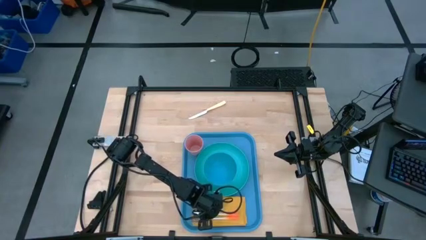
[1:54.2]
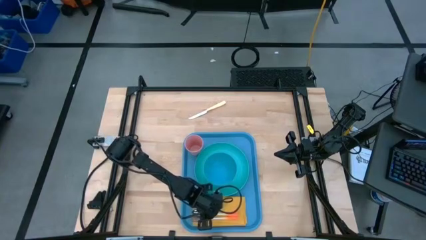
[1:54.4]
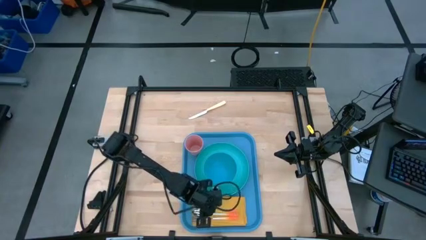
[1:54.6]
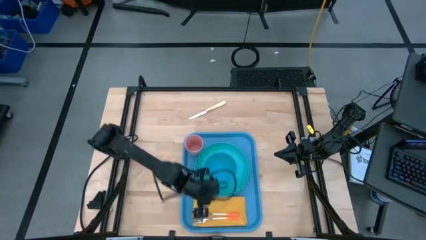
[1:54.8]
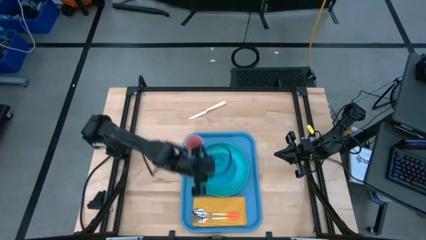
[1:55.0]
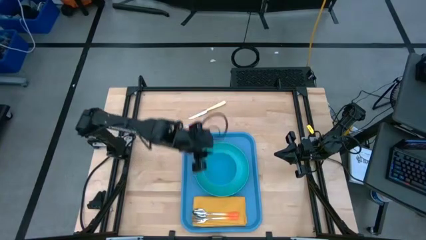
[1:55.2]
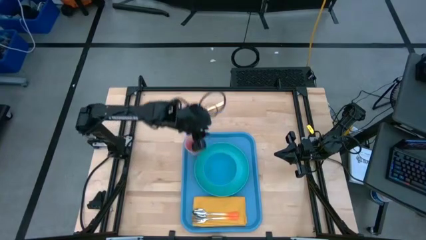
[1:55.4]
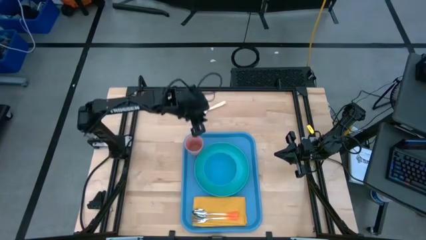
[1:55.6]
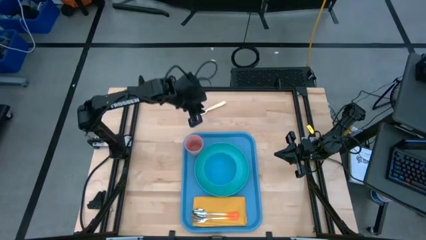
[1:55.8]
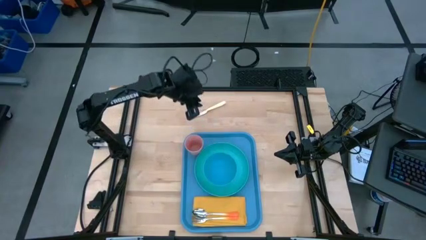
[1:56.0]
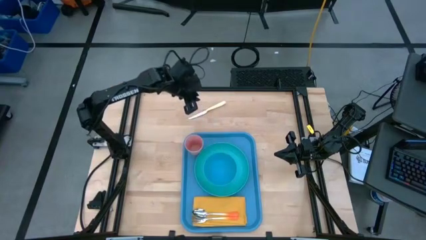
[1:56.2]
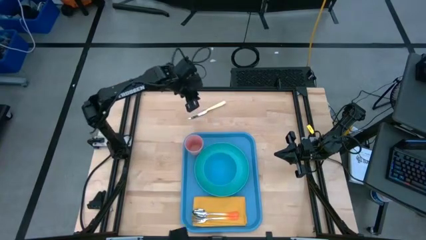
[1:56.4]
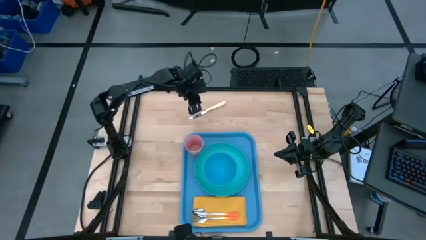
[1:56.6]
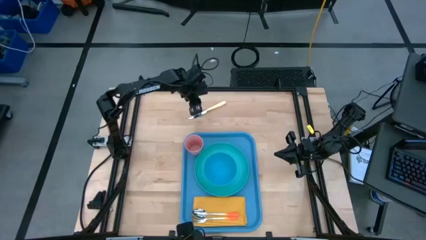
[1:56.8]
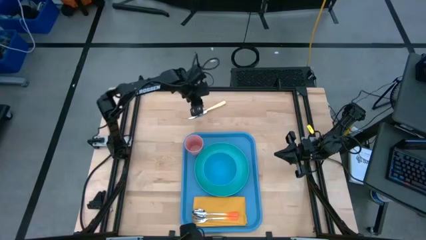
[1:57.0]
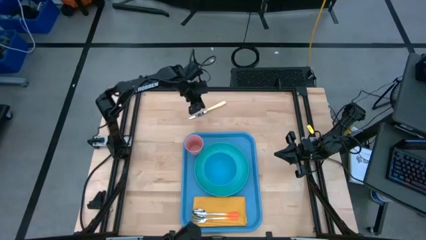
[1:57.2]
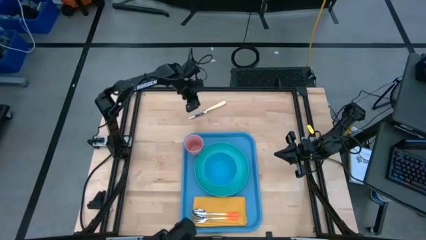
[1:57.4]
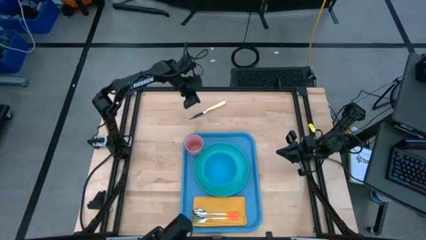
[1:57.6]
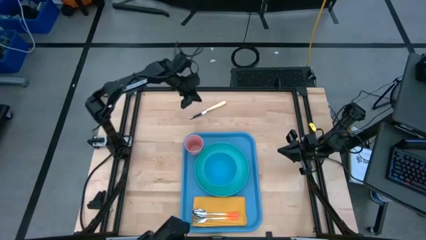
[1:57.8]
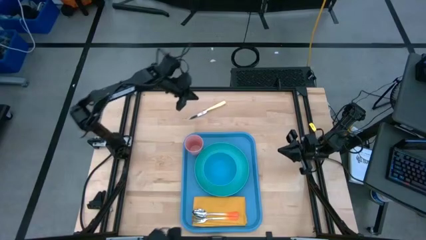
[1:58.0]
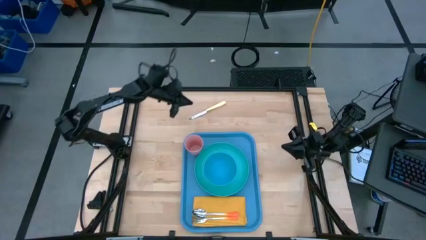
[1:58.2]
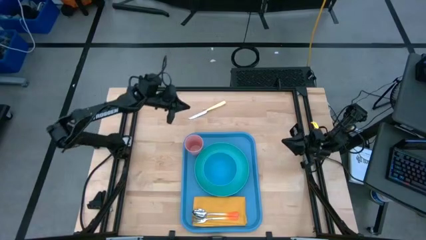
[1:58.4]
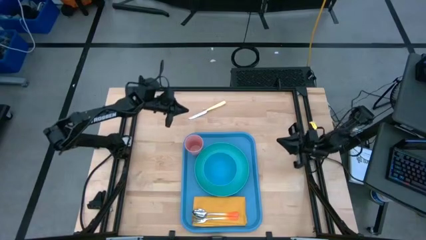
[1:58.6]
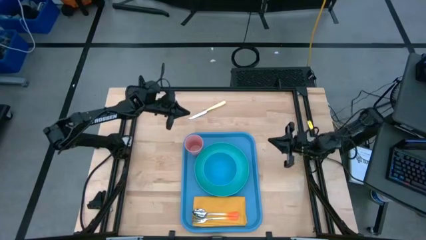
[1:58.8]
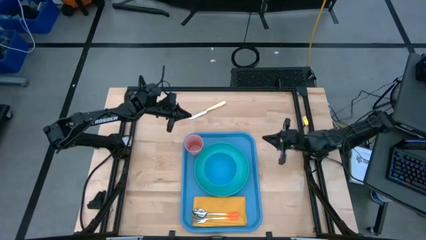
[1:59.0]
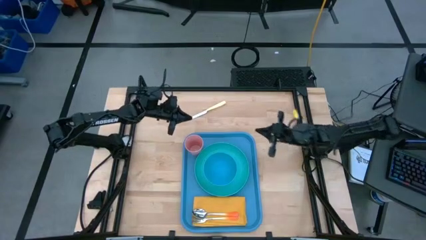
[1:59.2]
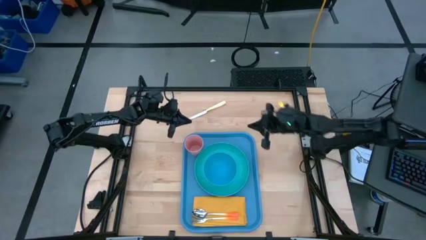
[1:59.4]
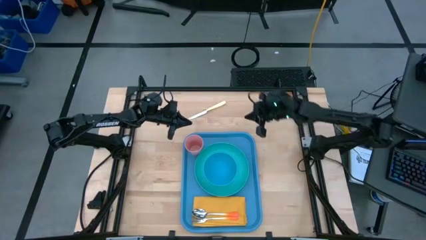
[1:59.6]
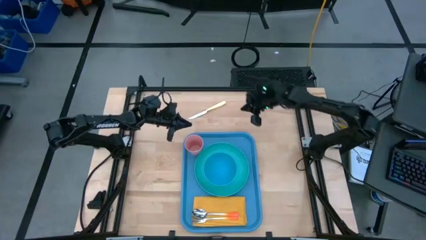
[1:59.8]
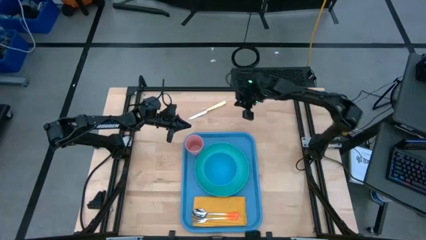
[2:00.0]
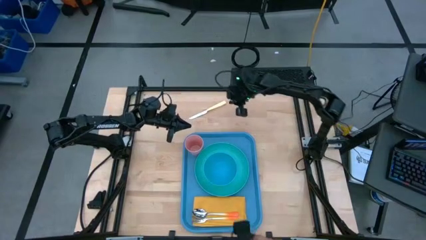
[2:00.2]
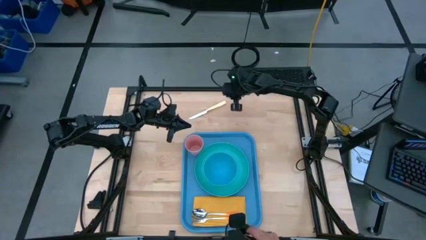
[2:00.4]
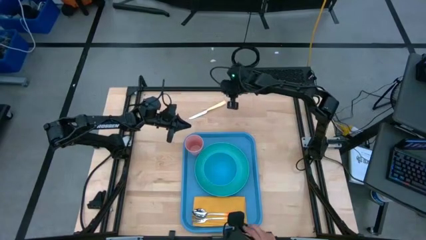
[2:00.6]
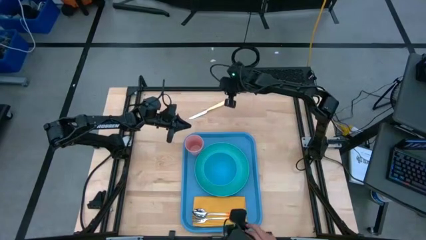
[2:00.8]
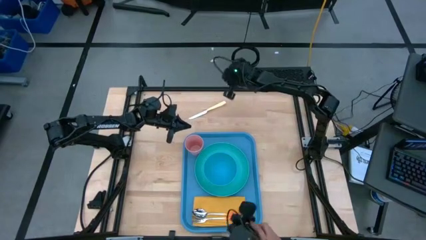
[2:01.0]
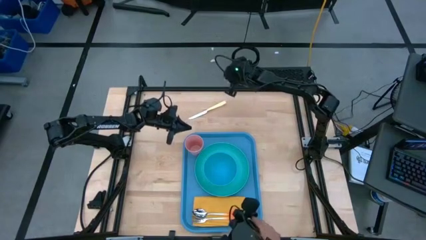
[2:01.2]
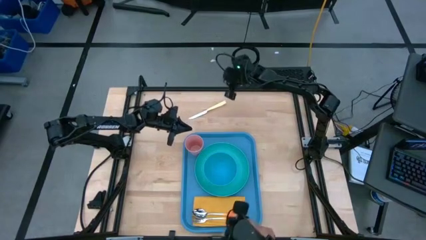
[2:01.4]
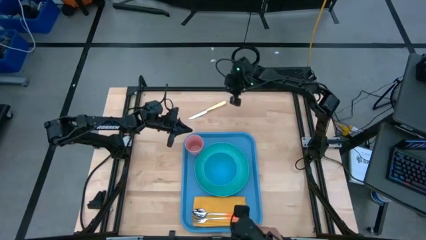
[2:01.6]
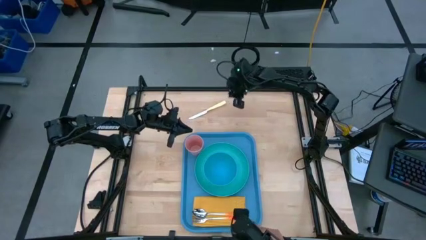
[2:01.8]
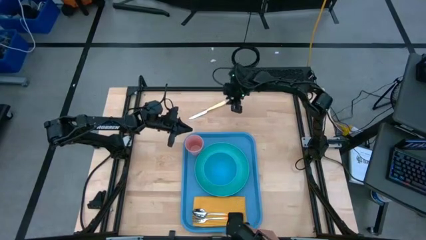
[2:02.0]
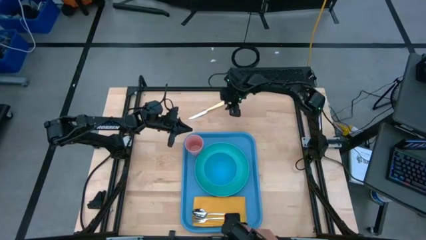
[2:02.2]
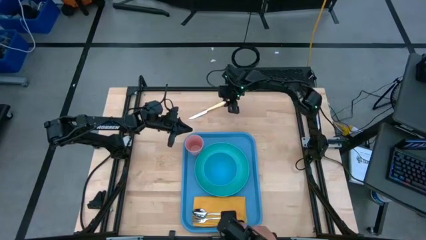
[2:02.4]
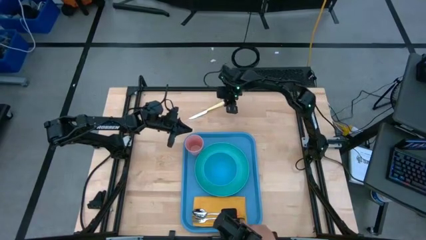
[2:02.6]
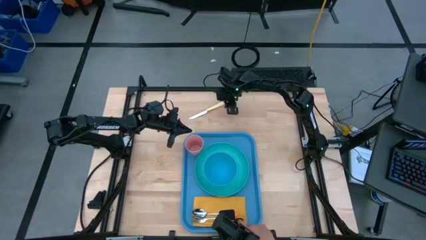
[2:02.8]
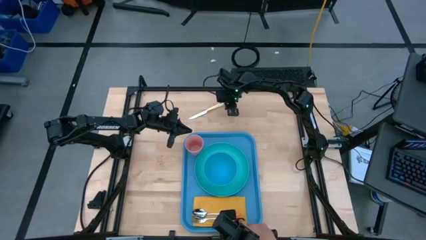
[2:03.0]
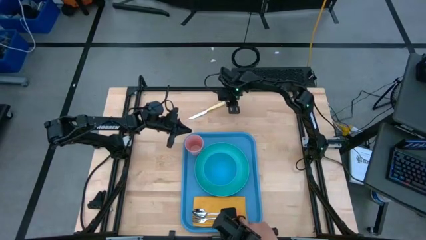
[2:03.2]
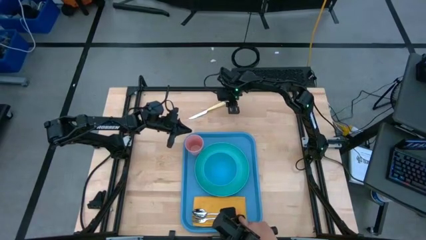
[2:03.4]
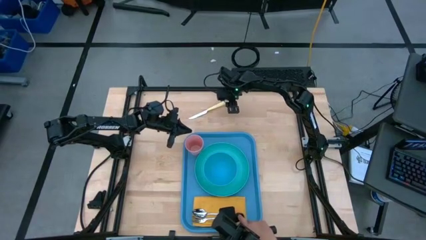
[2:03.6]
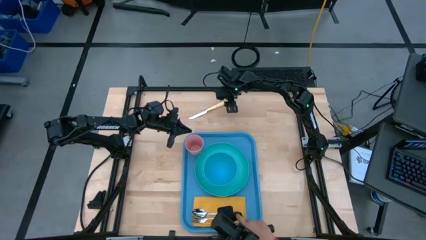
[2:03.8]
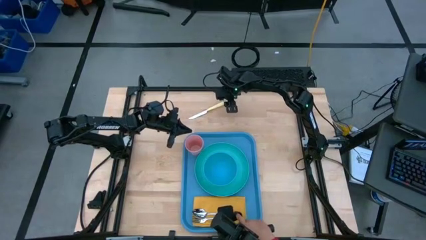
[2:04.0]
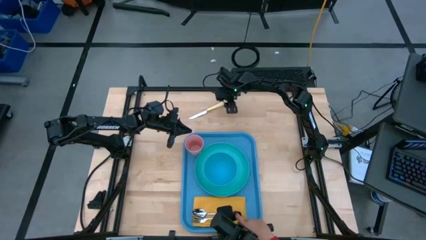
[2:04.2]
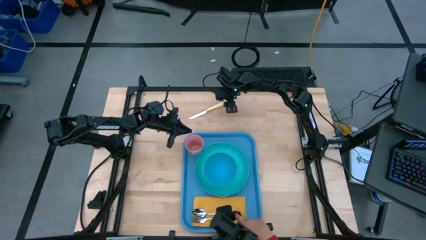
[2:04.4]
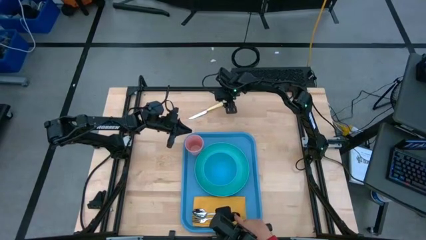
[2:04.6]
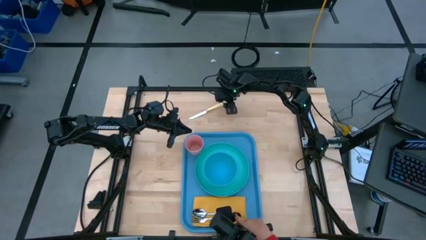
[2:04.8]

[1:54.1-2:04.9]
Task: Set up tray
Put the yellow table knife on the yellow table napkin to the top of the orange spoon
